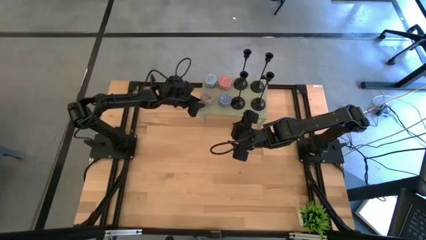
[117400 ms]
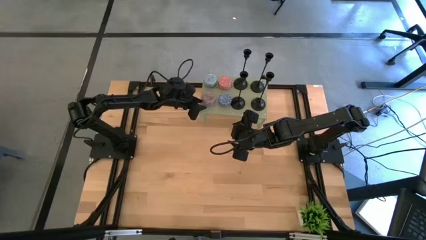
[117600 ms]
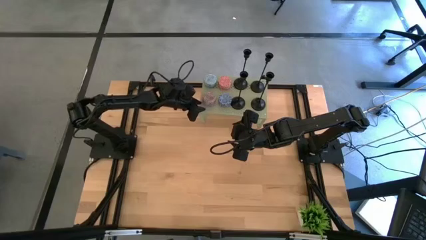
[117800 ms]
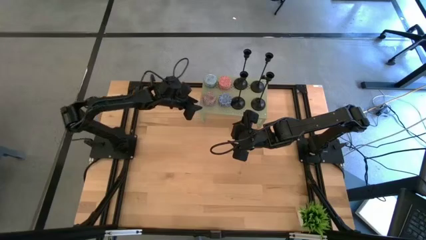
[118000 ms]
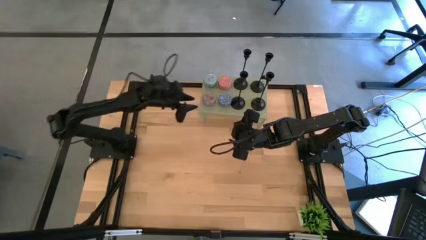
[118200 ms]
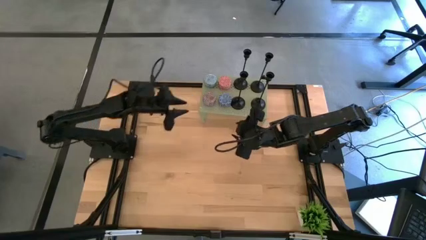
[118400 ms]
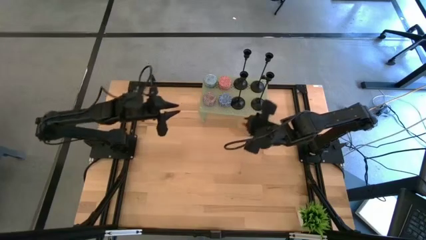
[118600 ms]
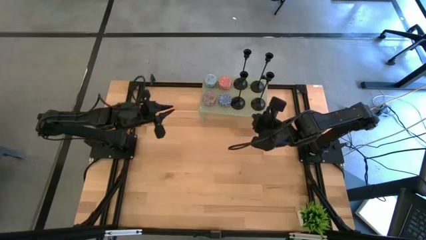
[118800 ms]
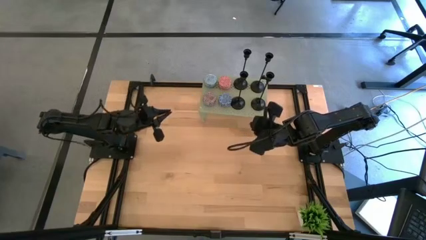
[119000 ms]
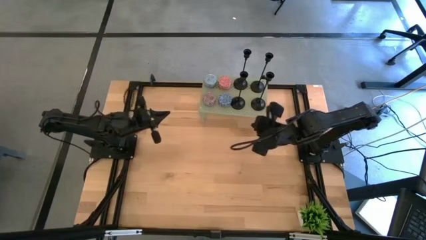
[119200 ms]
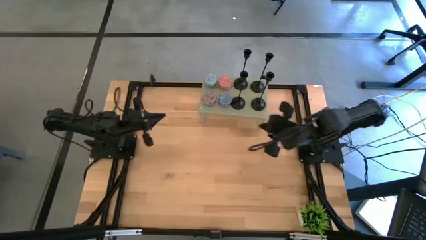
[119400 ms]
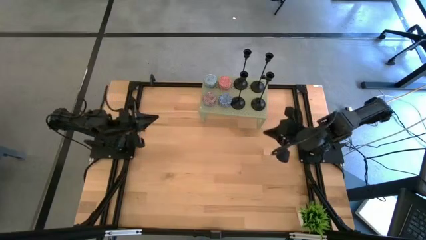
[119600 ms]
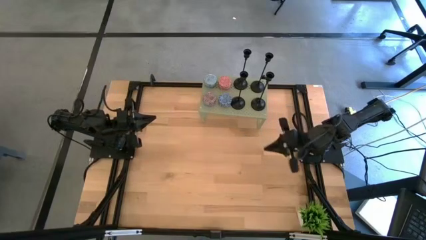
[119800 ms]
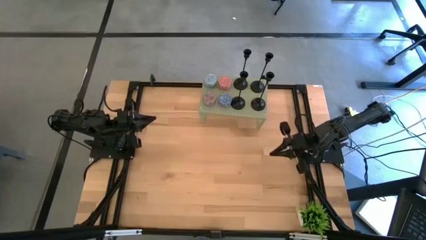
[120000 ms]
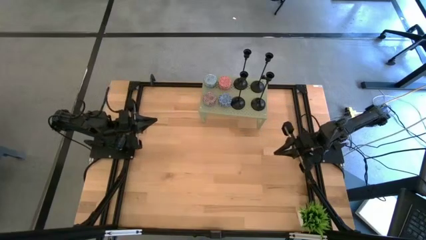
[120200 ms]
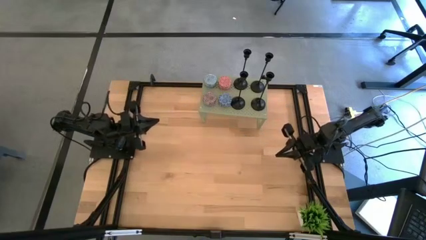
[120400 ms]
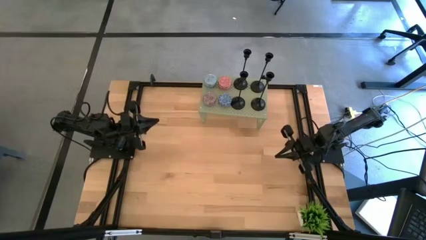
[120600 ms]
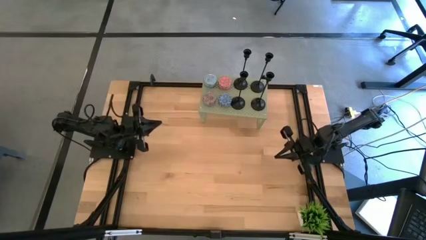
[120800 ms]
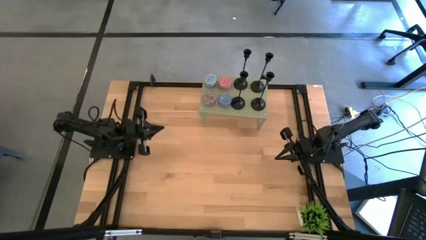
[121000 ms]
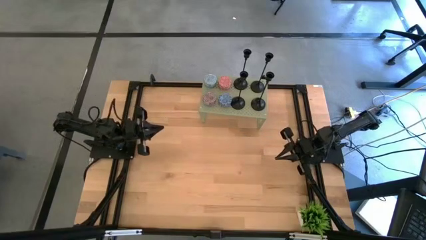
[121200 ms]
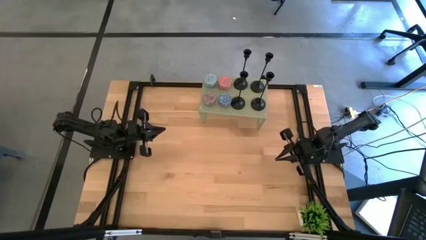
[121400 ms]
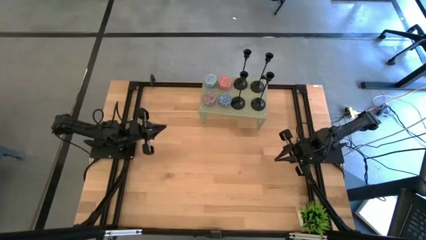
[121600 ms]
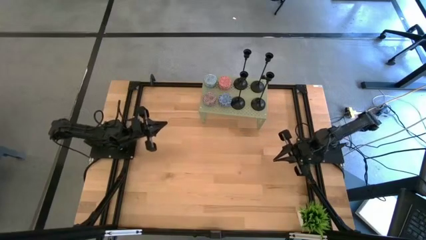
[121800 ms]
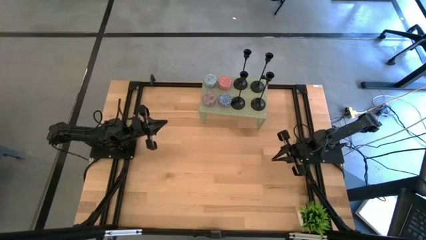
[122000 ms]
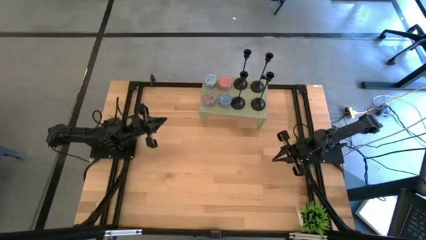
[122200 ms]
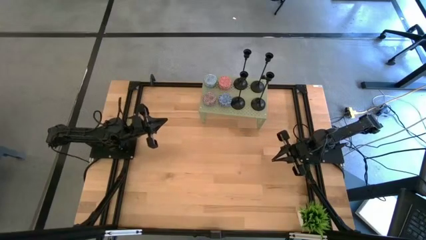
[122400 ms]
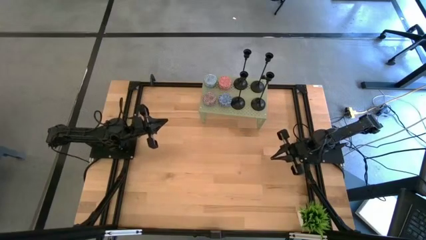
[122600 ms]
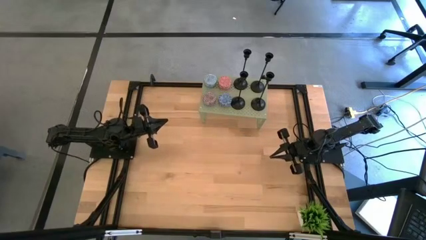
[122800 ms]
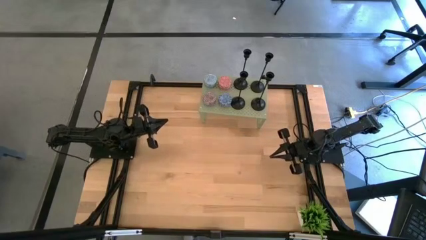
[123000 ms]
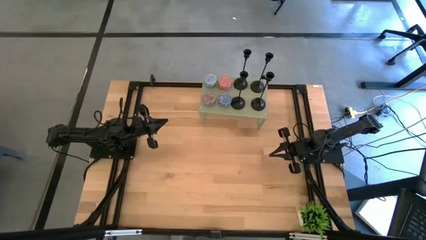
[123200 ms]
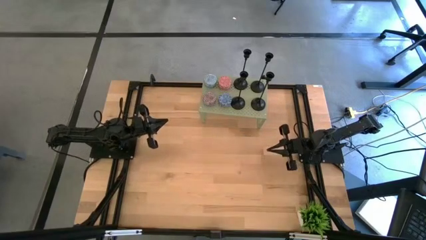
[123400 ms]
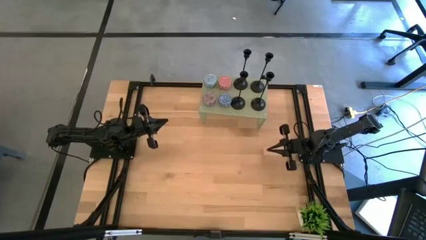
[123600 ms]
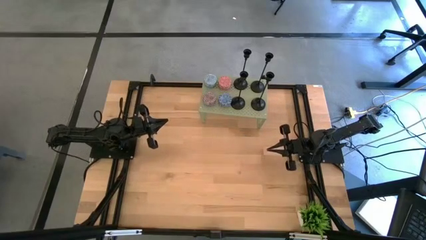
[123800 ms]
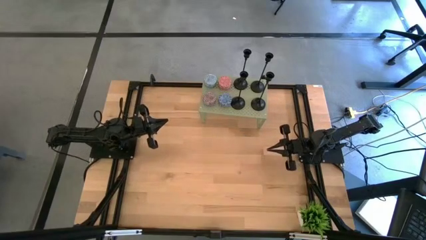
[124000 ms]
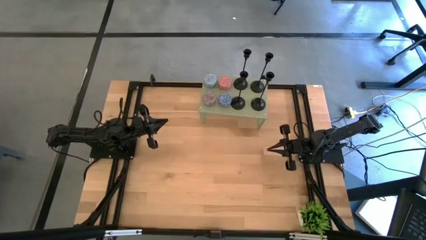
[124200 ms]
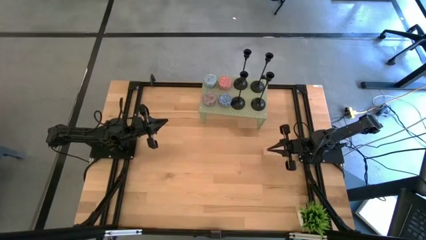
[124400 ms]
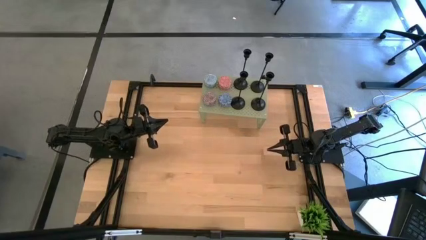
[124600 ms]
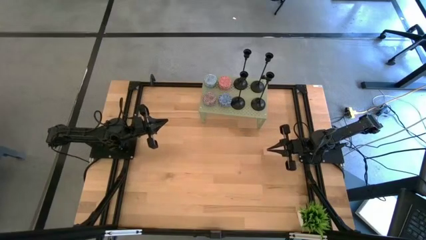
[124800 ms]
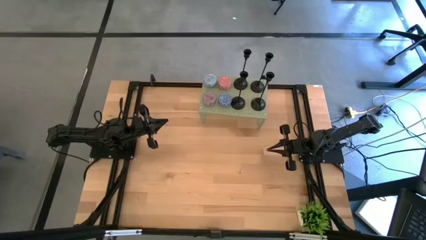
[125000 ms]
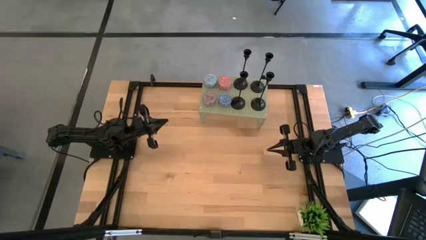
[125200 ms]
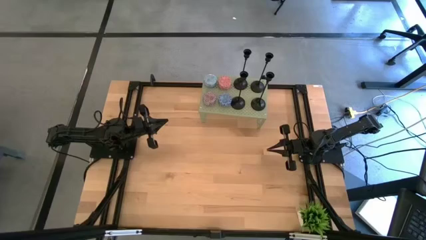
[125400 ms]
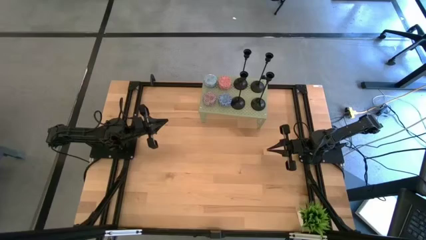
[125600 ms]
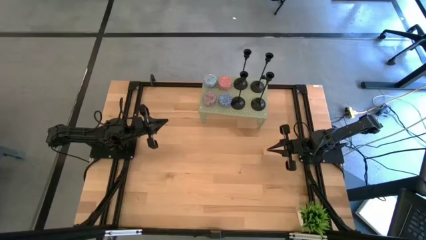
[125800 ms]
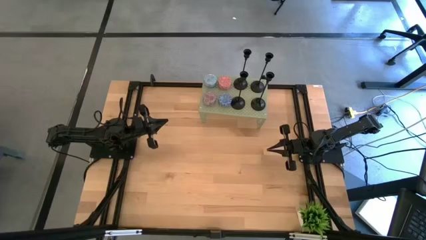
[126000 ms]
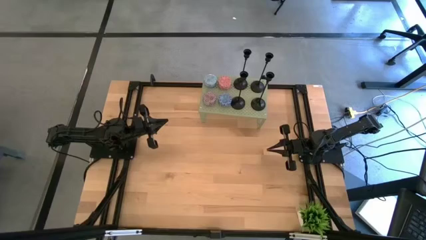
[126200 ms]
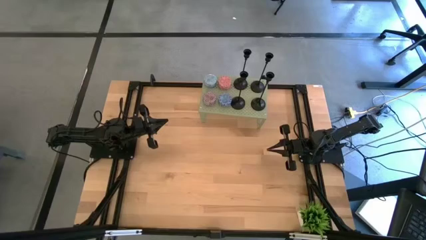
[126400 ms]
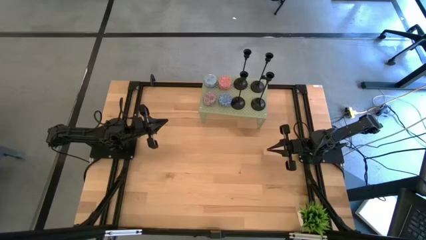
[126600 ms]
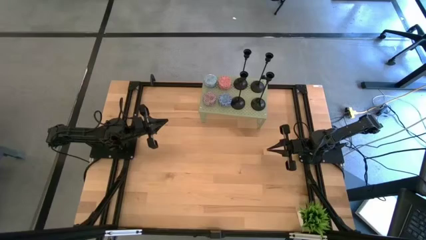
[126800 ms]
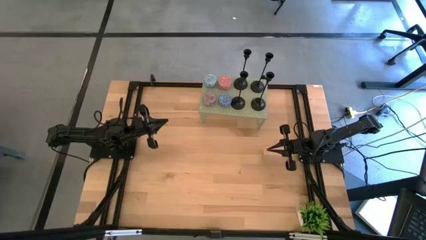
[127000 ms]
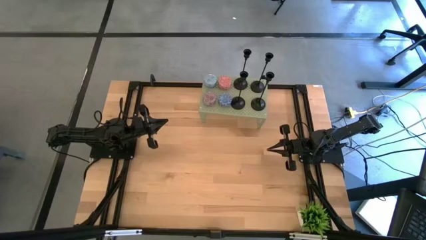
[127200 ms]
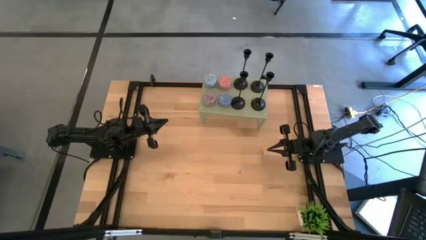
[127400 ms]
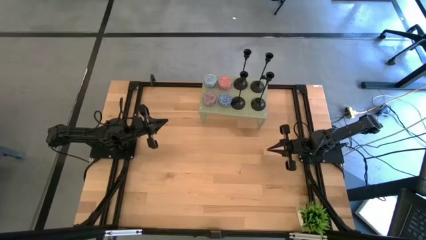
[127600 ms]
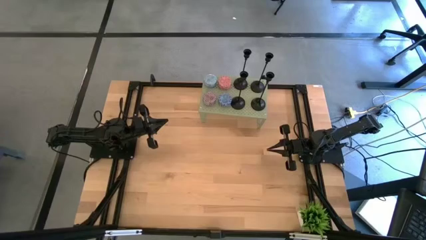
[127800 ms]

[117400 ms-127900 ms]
Task: Pick & Place candle stick holders
Return to Home Position

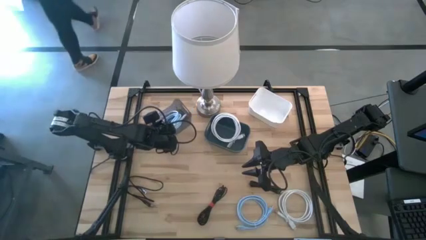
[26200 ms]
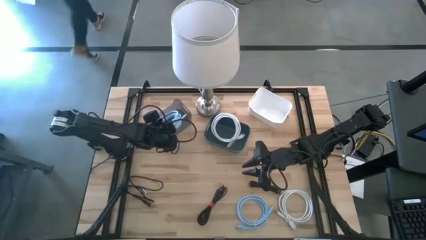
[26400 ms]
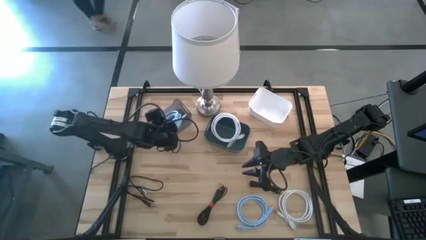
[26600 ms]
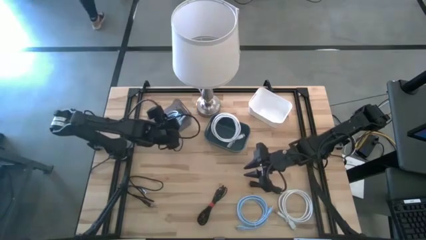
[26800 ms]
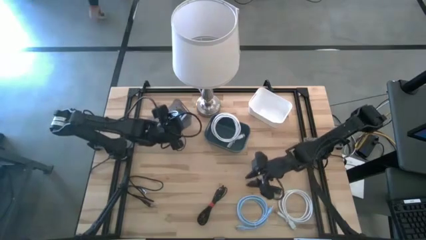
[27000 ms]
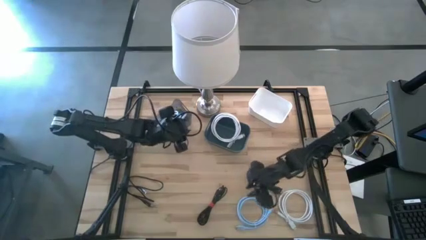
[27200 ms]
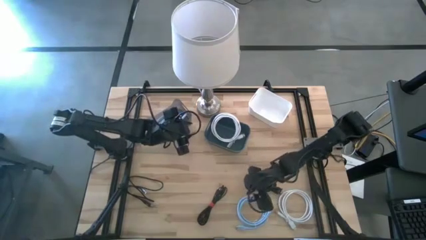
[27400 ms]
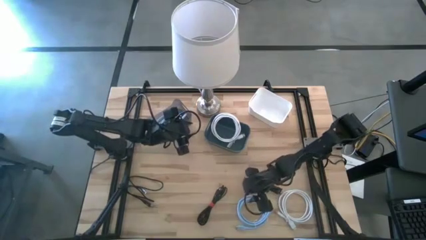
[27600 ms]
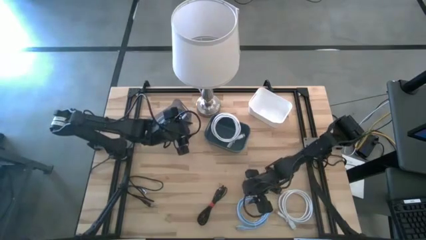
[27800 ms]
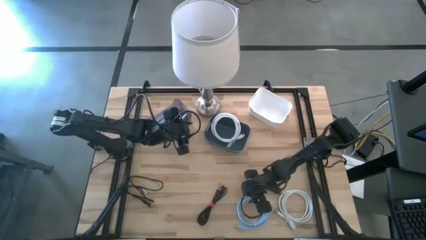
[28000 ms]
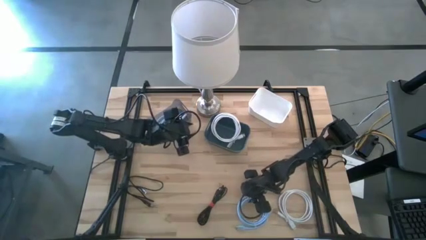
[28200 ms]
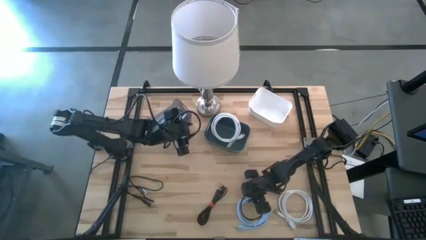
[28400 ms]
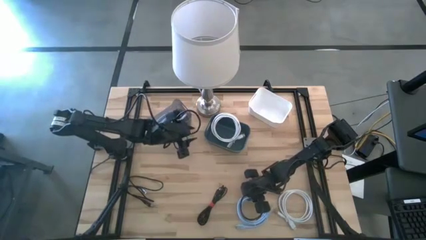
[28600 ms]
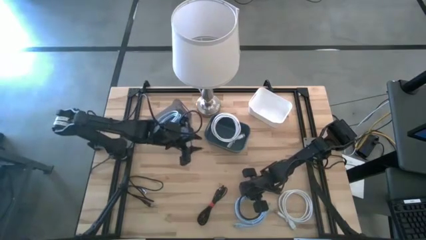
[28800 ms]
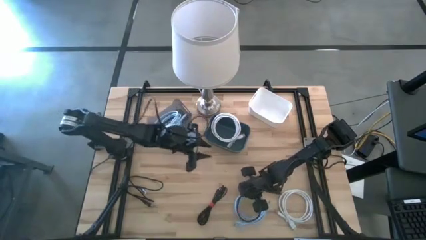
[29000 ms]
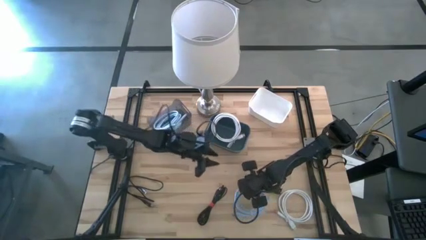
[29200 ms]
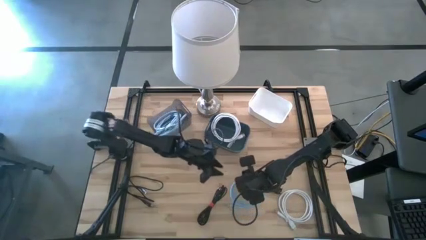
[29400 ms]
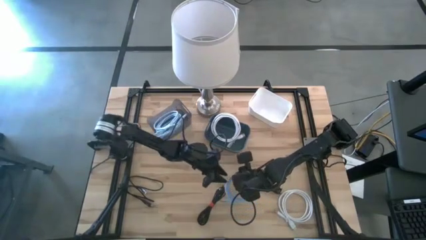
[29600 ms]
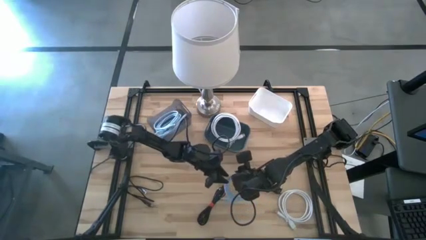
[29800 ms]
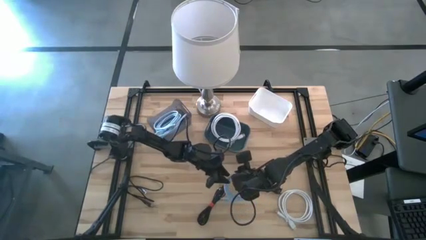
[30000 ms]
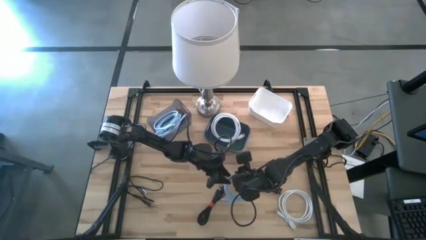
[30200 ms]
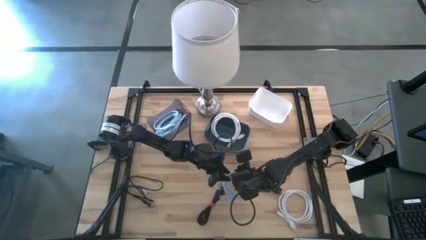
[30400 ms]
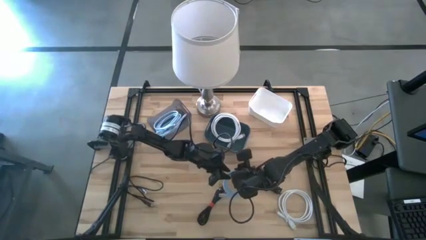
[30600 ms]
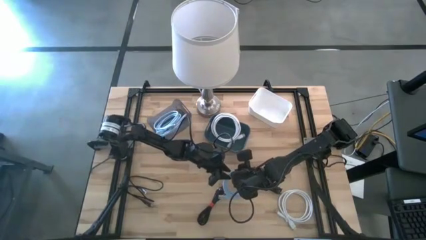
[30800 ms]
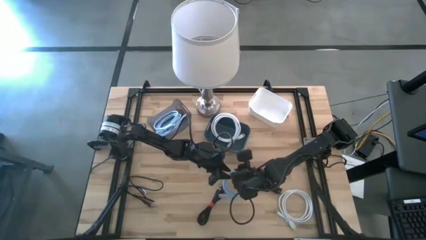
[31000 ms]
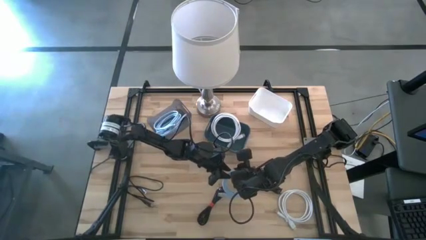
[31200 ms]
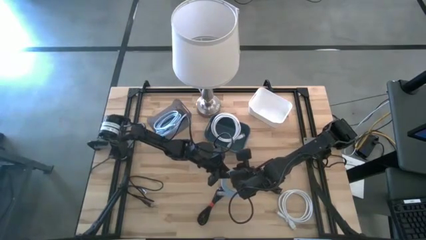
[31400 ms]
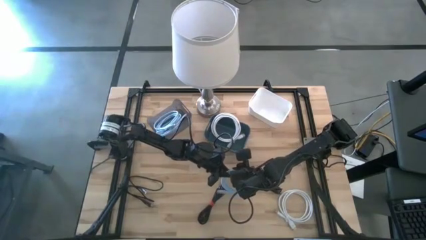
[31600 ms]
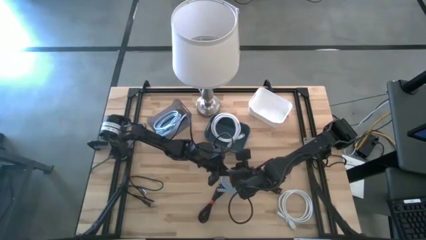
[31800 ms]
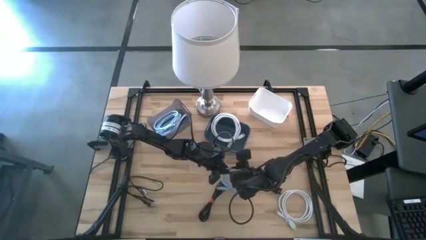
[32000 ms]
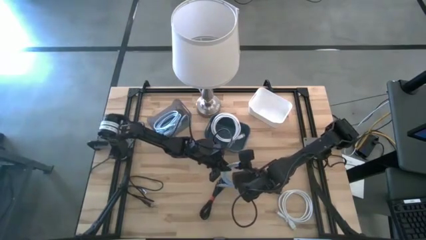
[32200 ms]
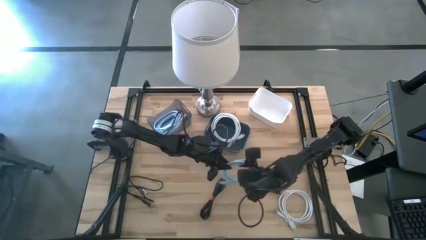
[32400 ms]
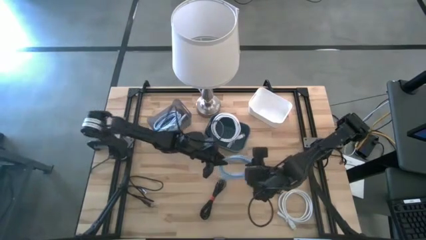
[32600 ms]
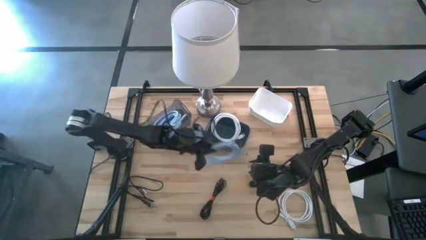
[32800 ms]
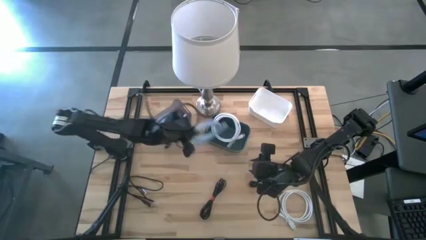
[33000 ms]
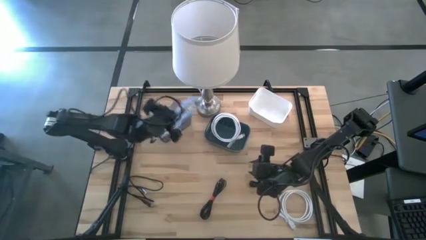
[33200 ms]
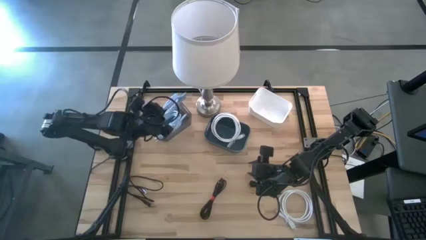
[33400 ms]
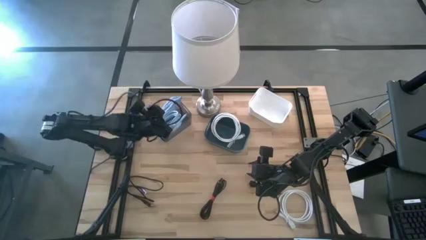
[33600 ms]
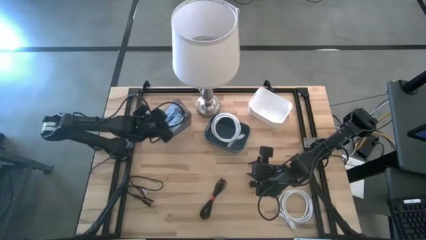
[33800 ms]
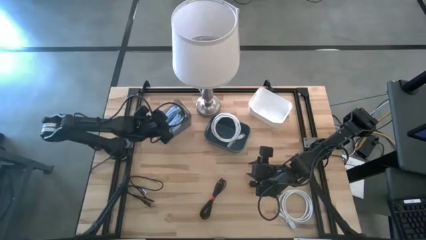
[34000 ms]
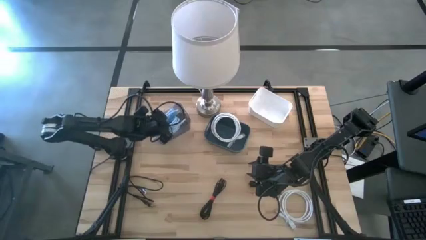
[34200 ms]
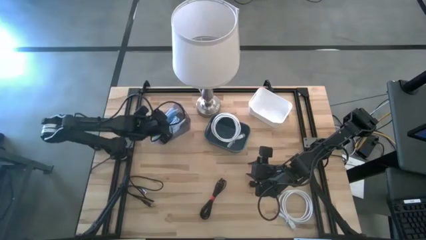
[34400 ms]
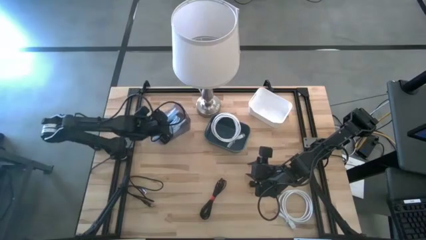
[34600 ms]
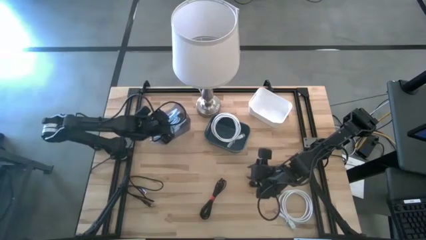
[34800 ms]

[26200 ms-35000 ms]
Task: Pick & Place USB Port
Put the blue hdmi cable into the black bin
